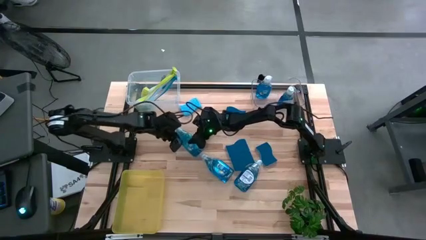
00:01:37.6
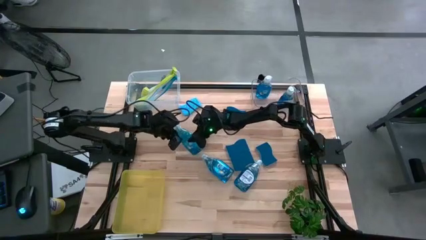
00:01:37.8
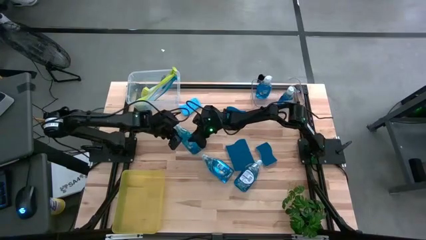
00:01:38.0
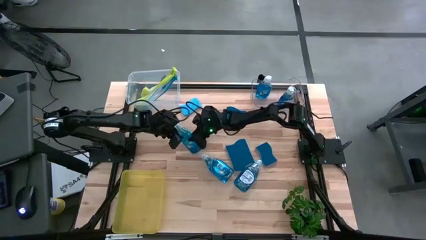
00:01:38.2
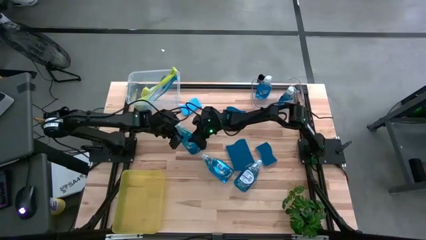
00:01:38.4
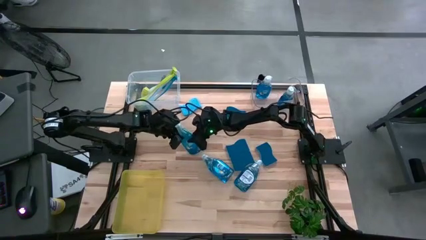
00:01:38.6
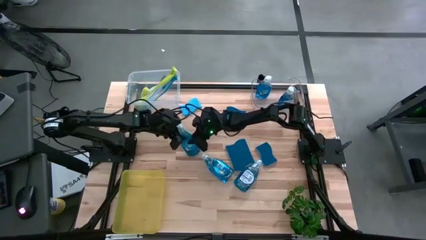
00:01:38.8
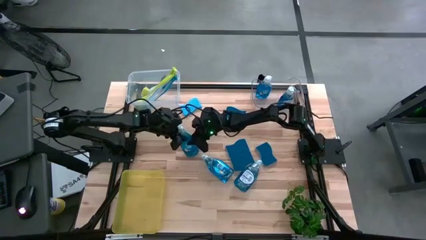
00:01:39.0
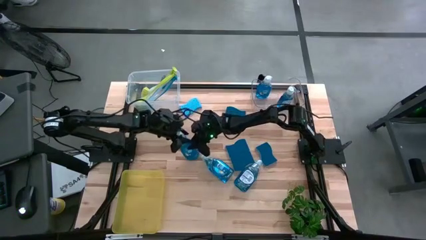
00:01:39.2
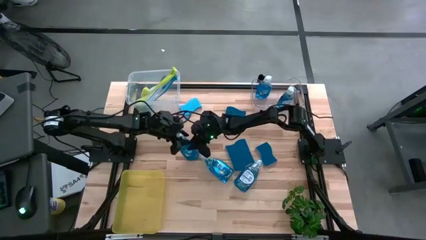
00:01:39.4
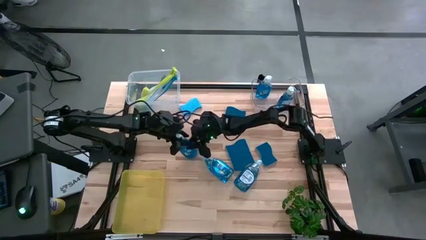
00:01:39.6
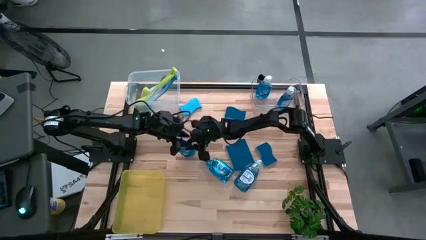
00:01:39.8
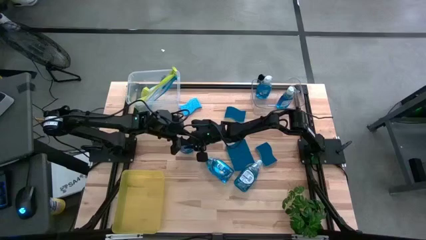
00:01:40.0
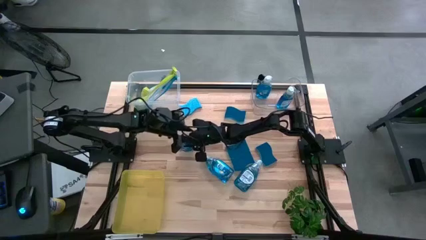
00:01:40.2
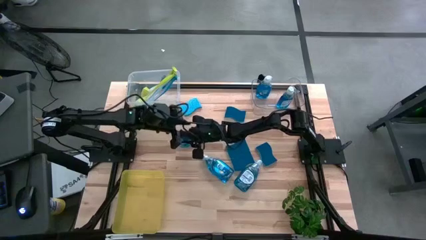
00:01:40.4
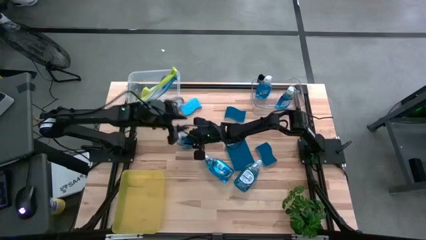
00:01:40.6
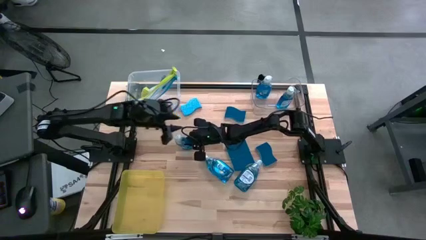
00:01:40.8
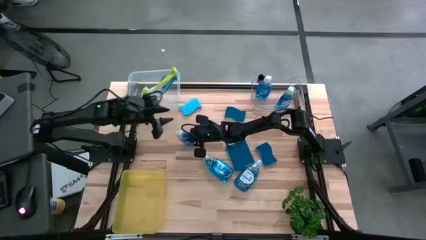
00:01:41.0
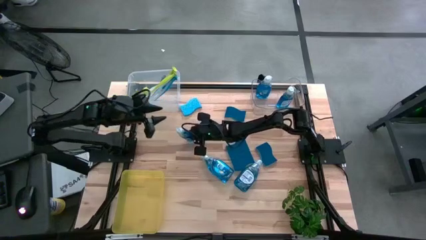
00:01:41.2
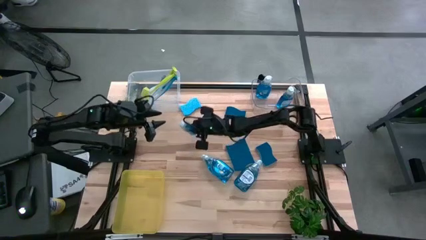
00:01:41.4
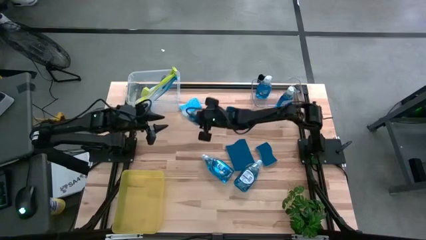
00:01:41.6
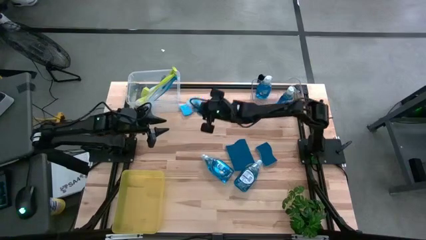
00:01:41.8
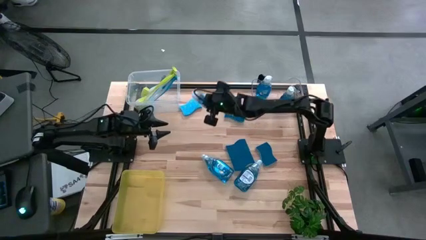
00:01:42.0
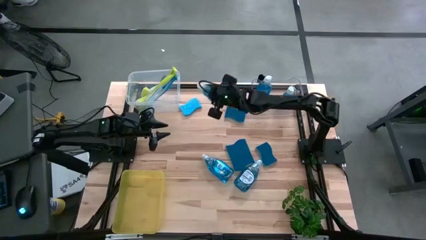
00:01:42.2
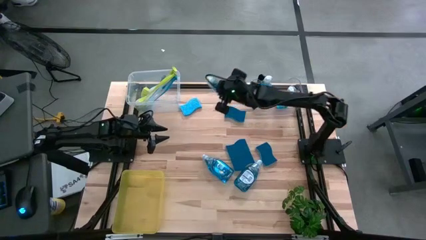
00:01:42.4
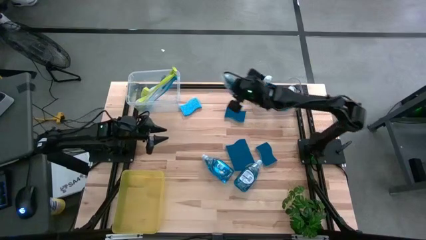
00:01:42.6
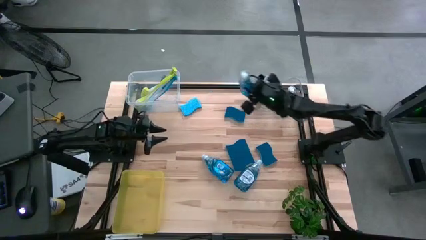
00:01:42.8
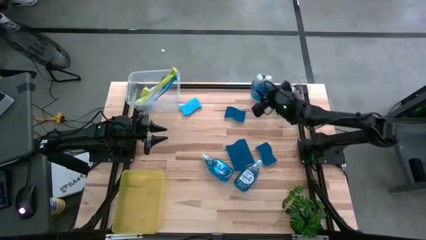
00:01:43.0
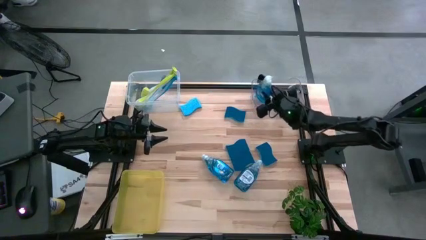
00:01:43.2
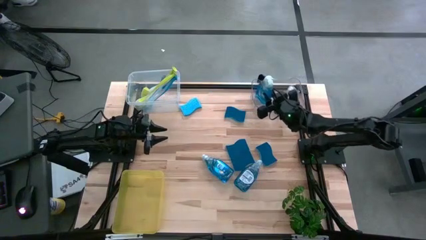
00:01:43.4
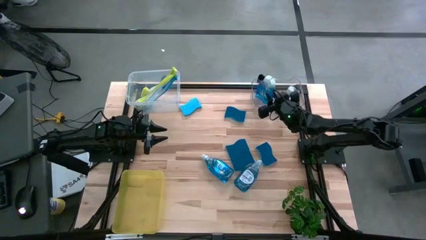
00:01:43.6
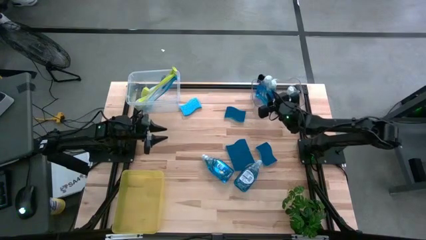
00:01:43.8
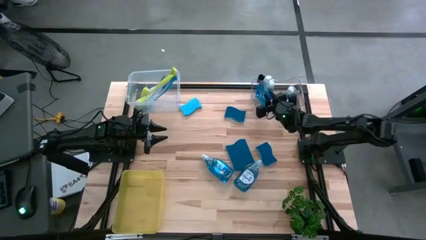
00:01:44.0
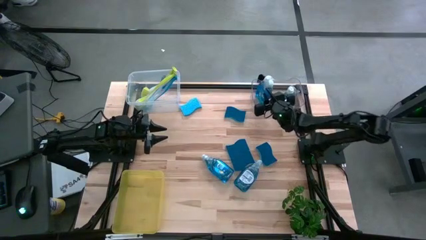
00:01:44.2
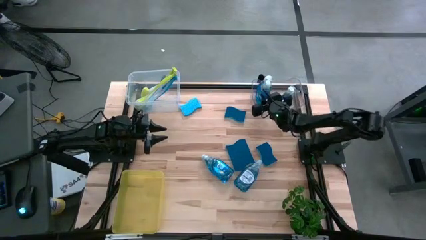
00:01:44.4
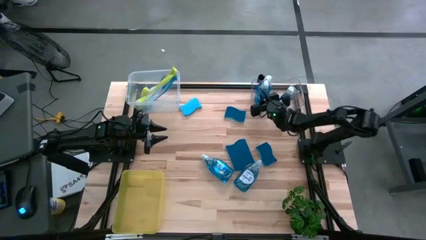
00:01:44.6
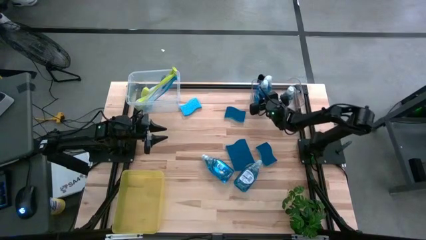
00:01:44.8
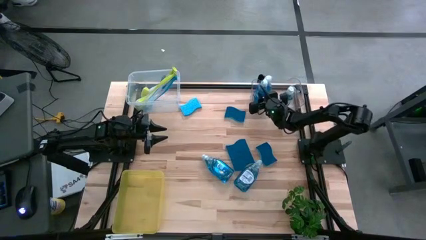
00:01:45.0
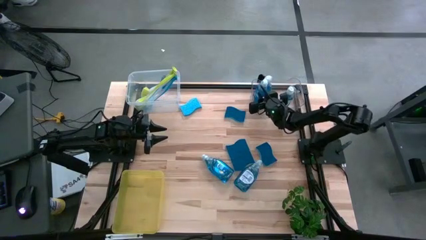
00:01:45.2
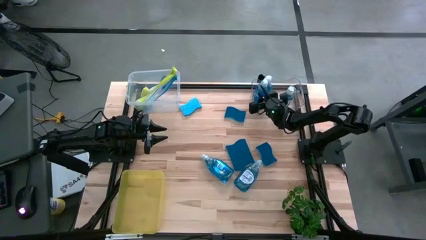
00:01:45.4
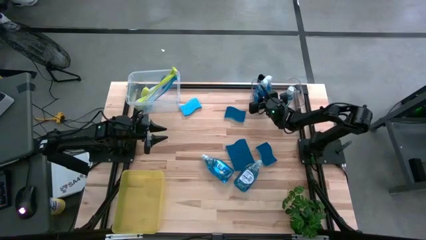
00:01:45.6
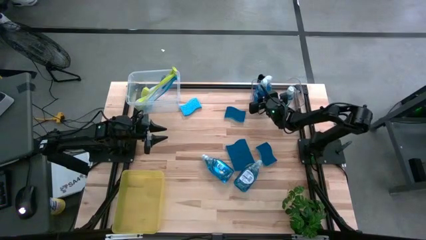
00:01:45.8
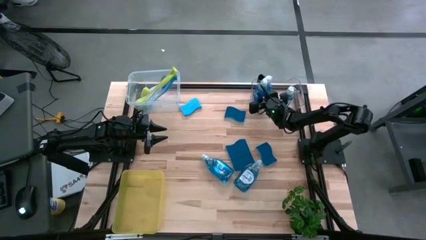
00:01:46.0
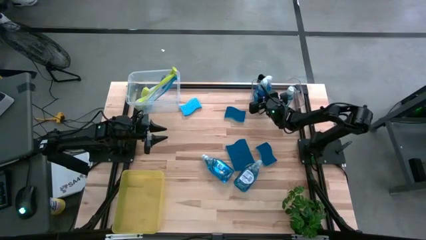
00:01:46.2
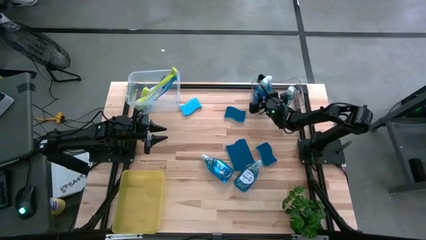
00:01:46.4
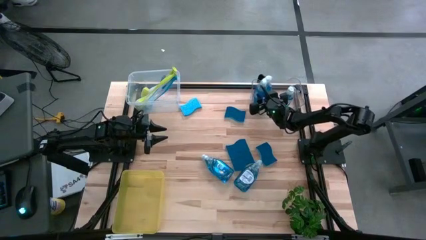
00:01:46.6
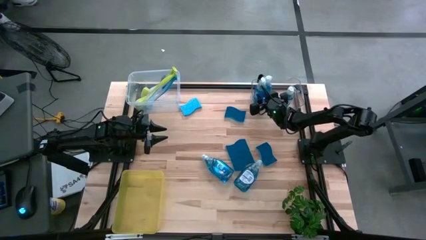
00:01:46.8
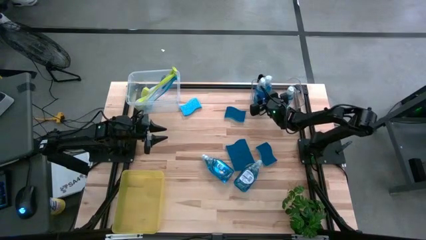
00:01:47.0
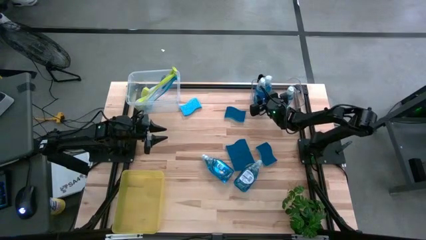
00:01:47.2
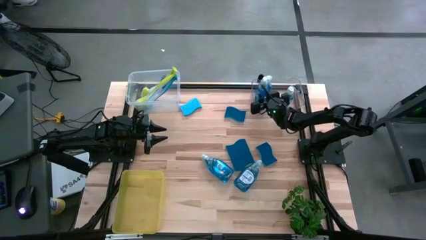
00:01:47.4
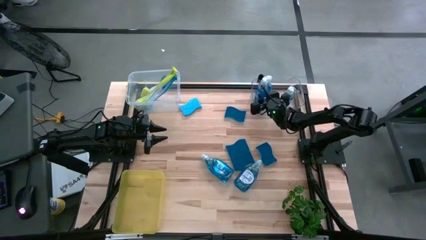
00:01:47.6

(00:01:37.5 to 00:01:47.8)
Task: Pick & Place Kitchen Sink Supplies
Put the top soap dispenser into the transparent bin

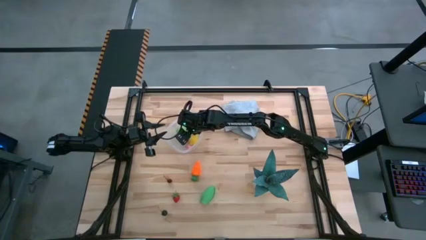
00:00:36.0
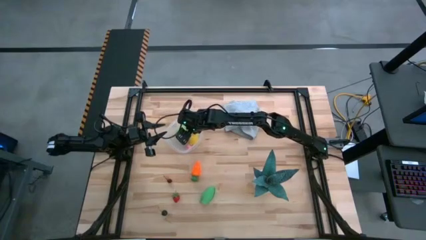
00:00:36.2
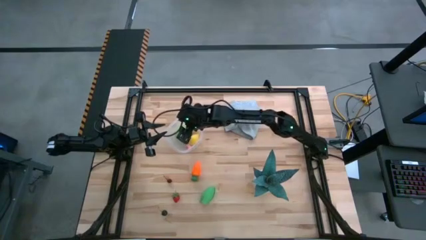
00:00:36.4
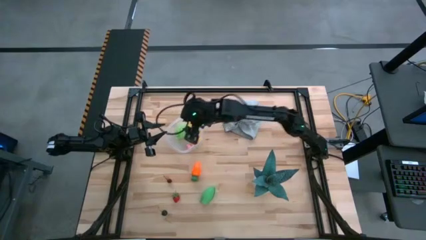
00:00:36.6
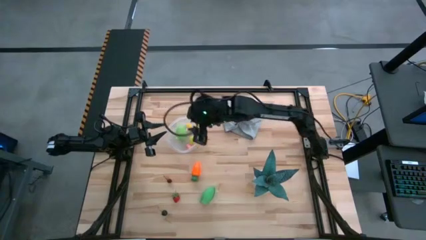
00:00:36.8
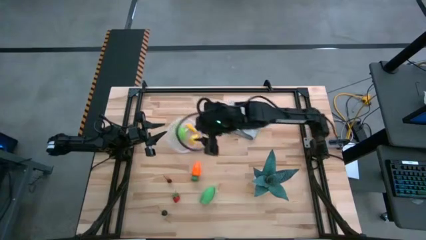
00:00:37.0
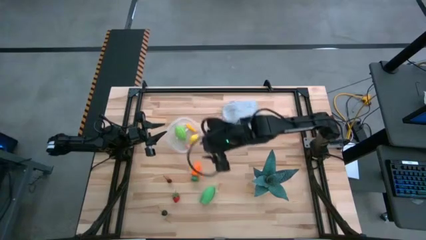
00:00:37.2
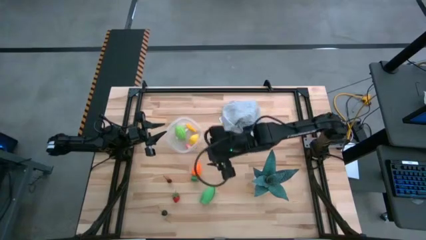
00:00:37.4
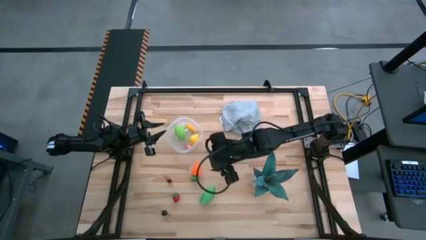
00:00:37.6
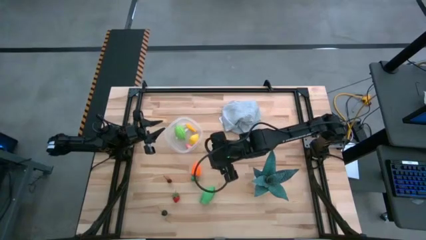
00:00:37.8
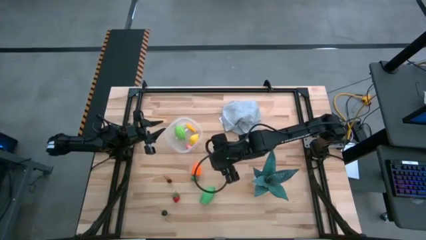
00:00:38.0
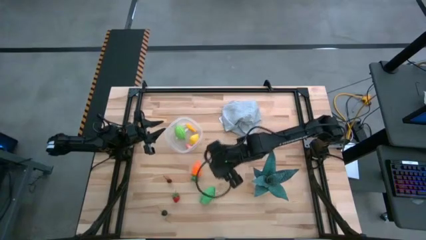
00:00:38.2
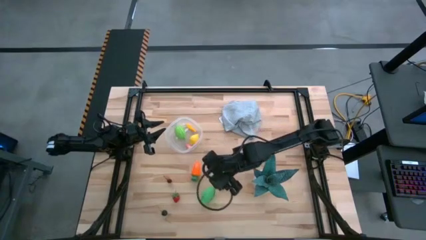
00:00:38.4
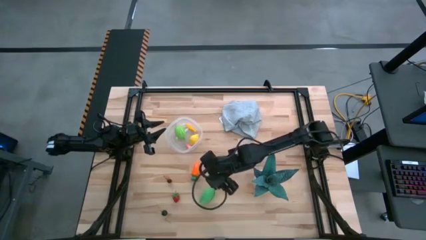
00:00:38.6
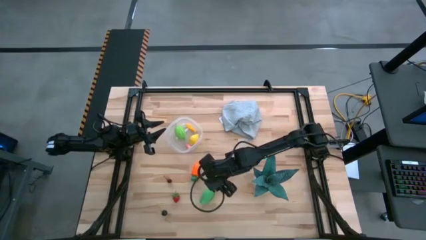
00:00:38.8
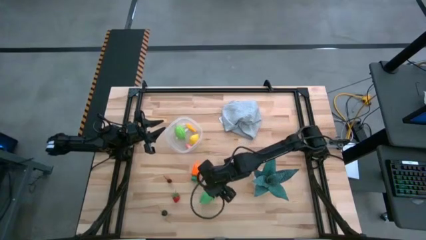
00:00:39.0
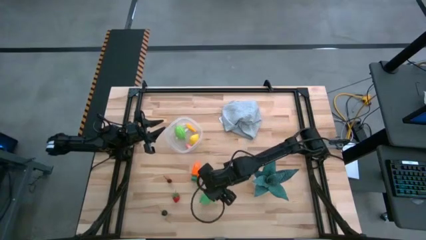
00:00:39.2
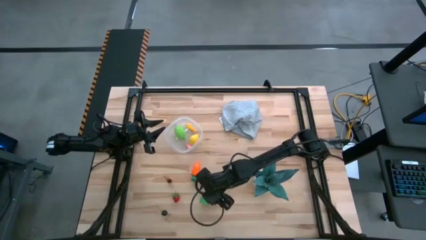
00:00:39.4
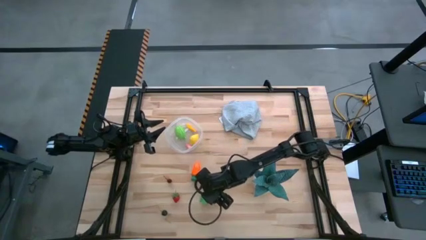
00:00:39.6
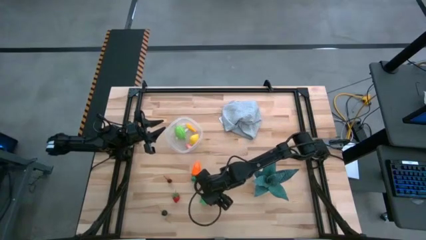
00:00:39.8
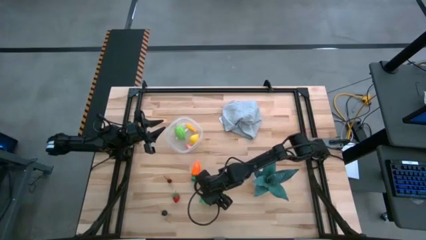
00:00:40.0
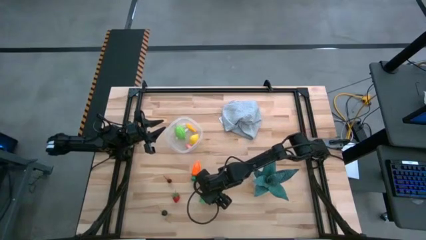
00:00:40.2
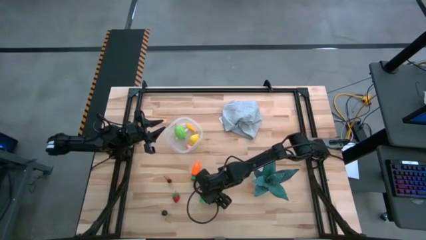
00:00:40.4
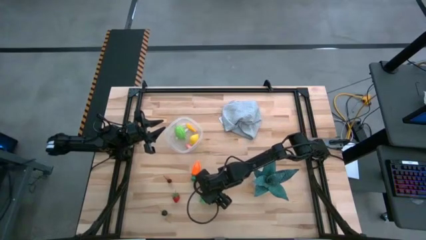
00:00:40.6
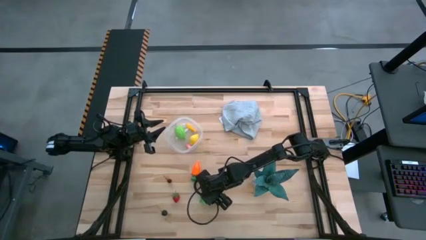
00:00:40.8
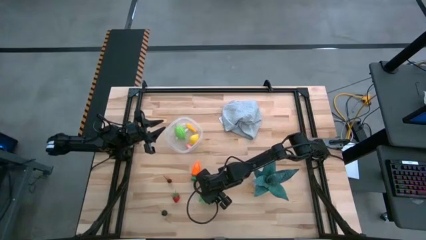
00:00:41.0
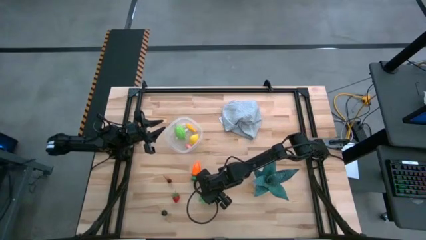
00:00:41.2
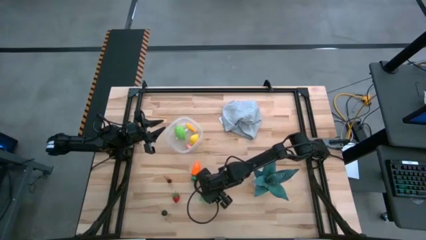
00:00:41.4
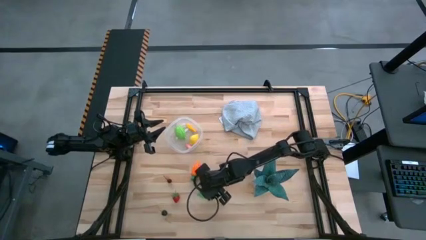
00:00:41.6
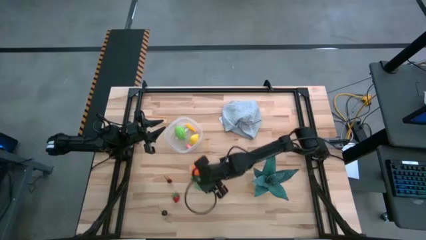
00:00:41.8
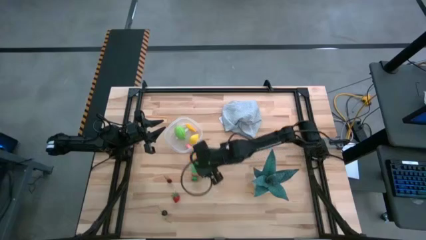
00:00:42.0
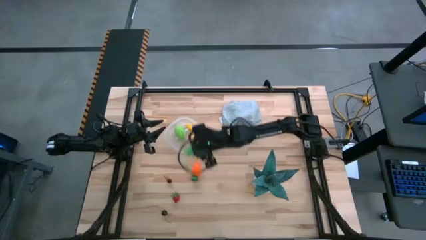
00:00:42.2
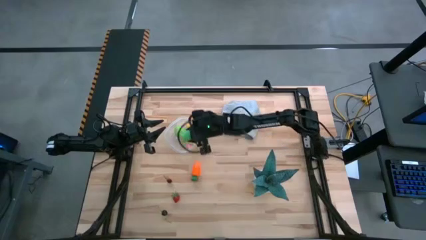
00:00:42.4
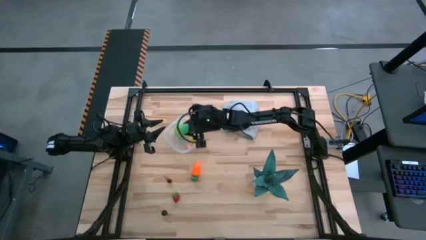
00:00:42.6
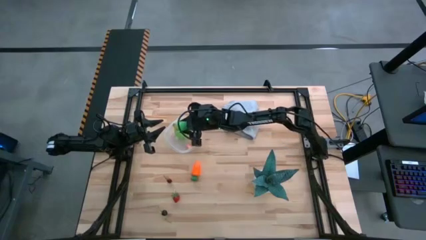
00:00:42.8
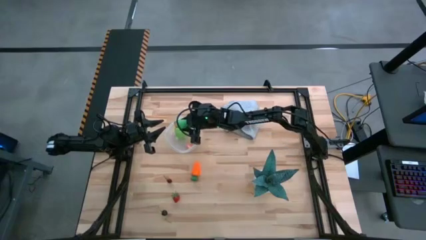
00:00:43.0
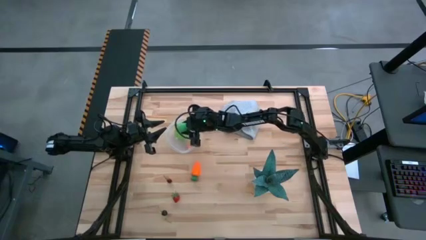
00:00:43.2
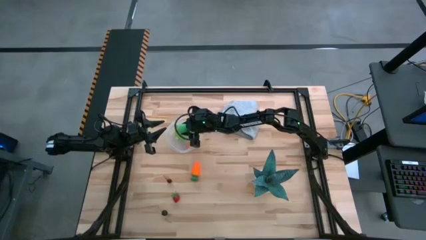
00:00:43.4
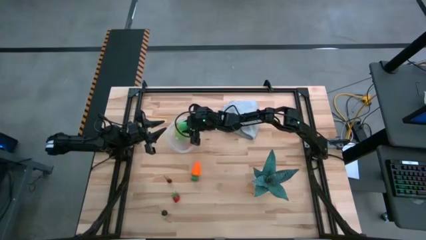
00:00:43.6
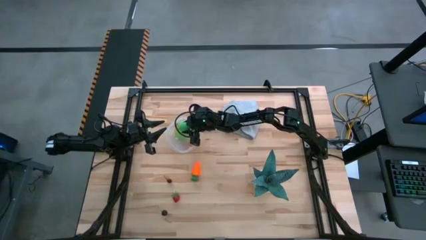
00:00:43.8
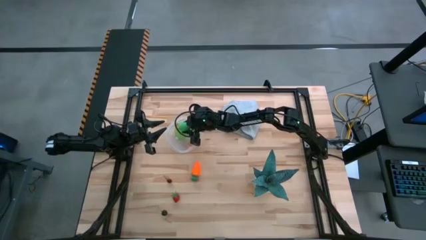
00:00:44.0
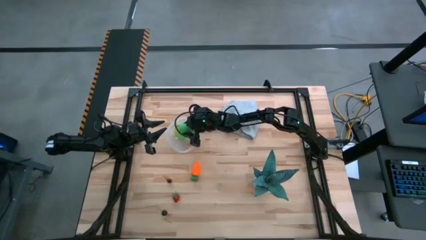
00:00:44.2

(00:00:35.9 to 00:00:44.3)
Task: Pick and placing Produce into tupperware
Put the green corn into the transparent container
